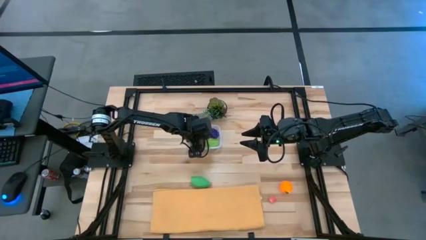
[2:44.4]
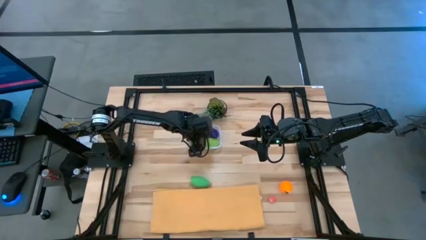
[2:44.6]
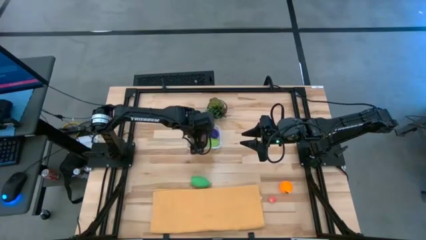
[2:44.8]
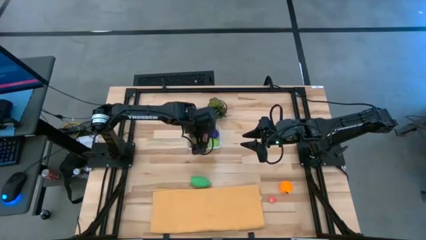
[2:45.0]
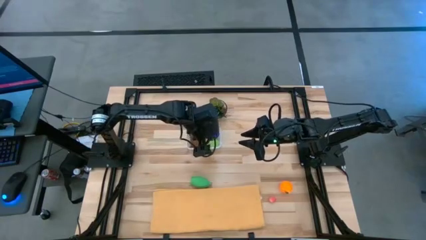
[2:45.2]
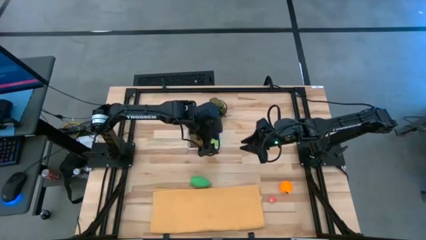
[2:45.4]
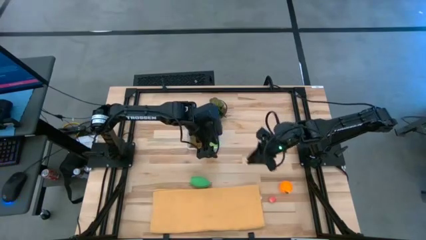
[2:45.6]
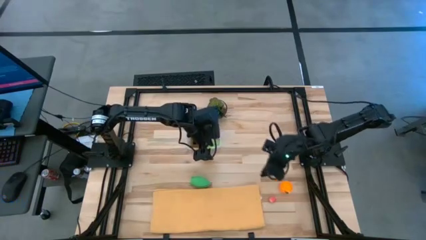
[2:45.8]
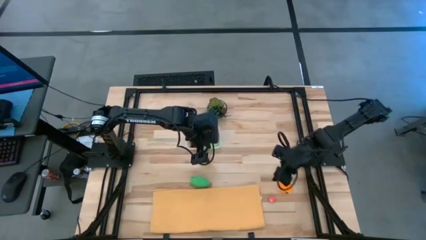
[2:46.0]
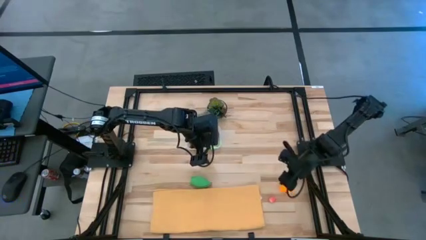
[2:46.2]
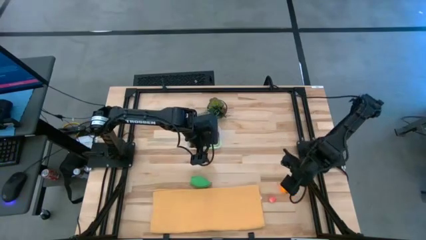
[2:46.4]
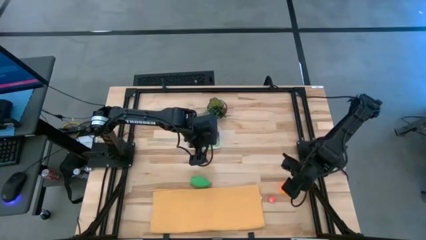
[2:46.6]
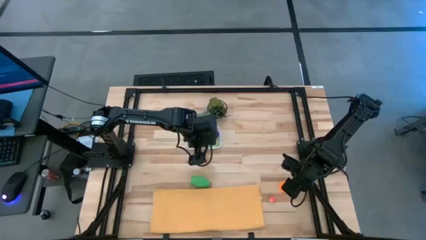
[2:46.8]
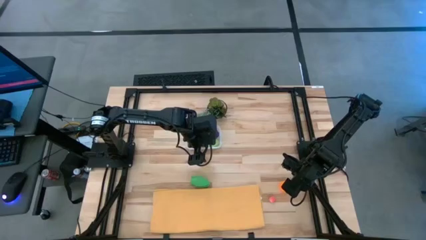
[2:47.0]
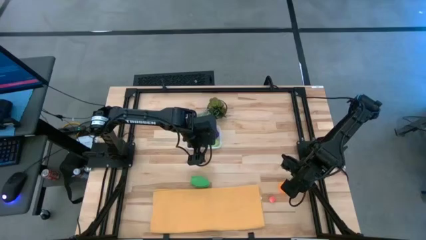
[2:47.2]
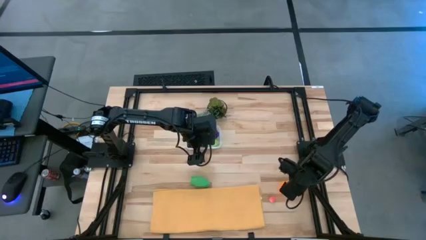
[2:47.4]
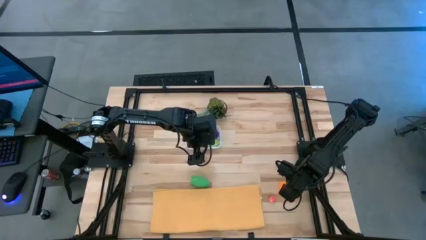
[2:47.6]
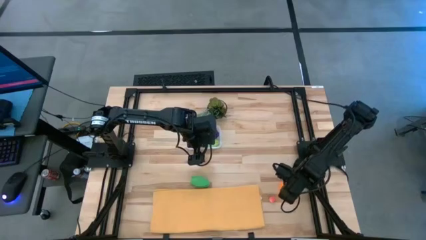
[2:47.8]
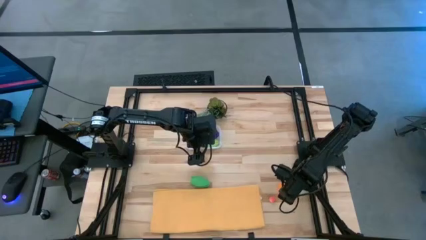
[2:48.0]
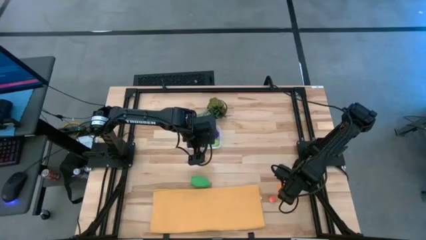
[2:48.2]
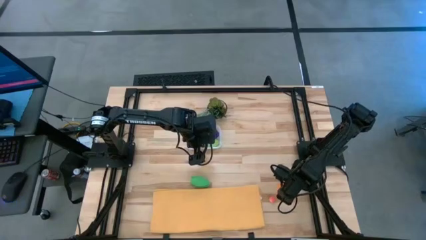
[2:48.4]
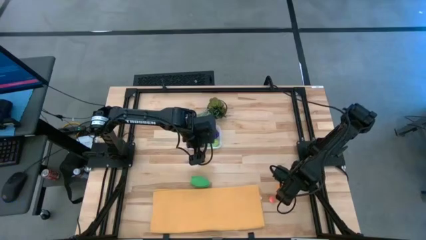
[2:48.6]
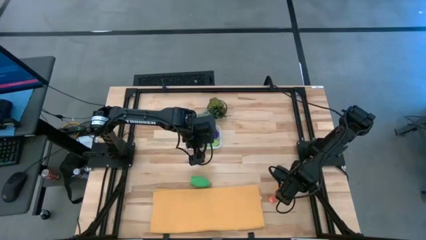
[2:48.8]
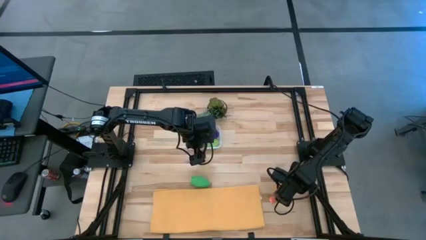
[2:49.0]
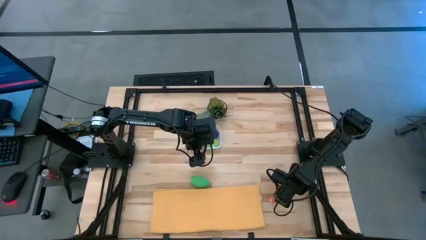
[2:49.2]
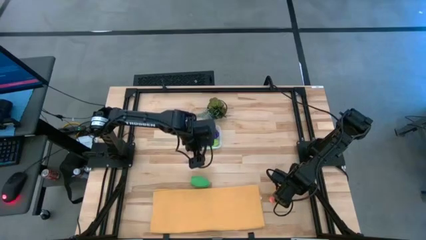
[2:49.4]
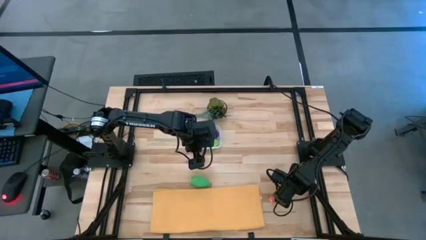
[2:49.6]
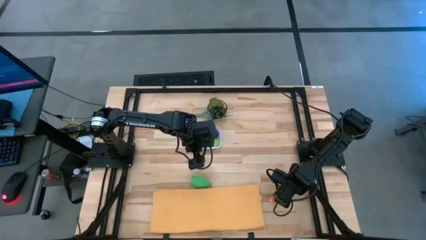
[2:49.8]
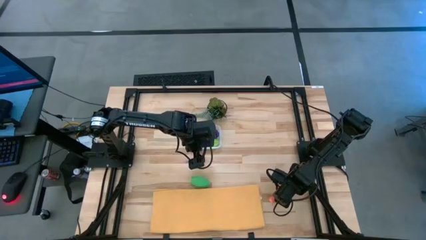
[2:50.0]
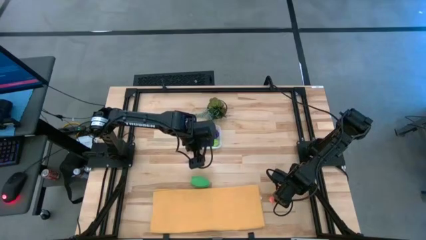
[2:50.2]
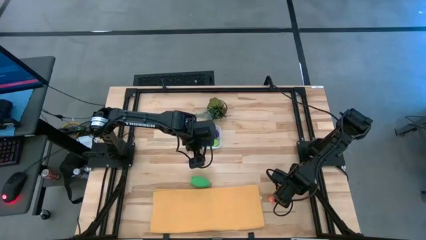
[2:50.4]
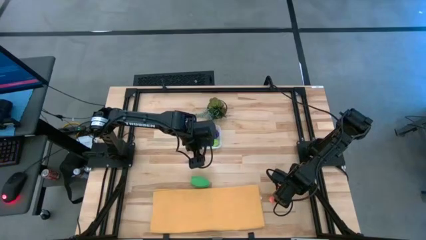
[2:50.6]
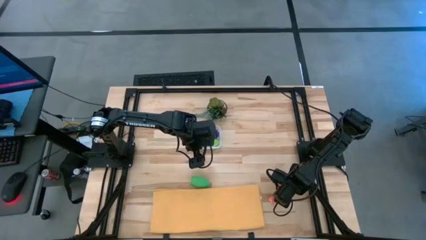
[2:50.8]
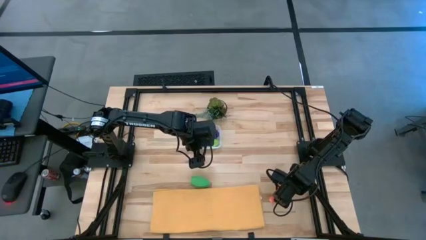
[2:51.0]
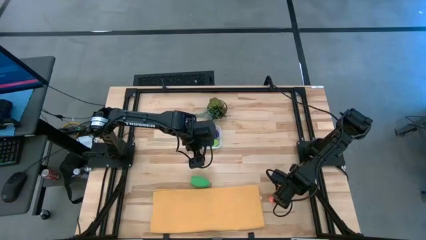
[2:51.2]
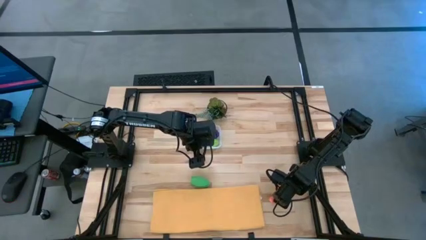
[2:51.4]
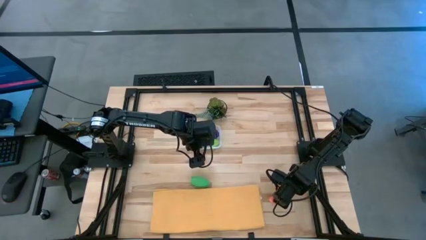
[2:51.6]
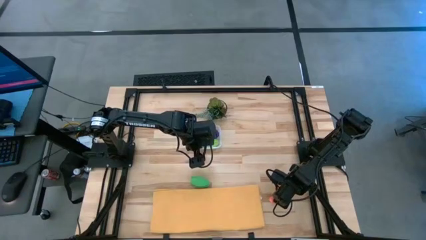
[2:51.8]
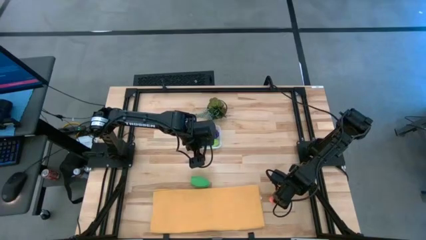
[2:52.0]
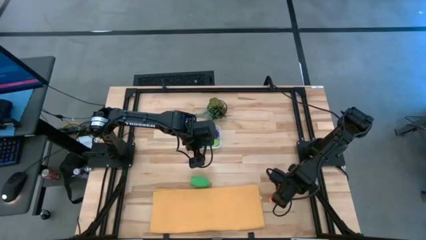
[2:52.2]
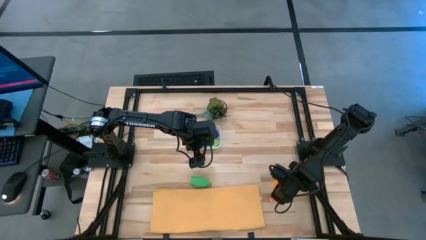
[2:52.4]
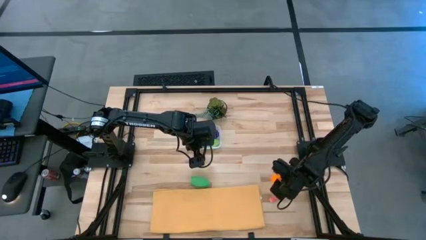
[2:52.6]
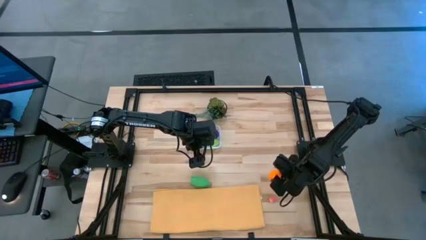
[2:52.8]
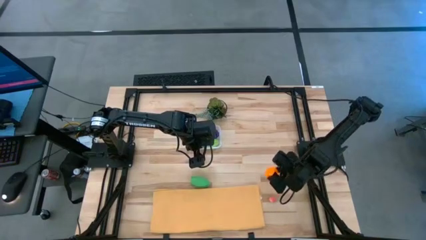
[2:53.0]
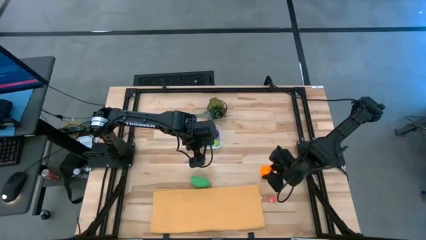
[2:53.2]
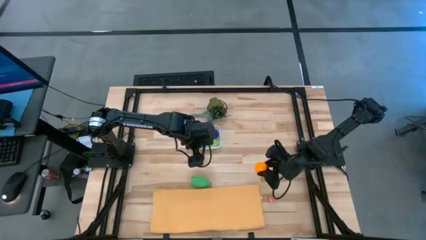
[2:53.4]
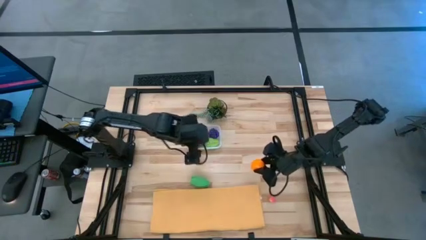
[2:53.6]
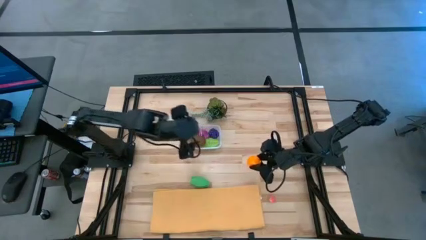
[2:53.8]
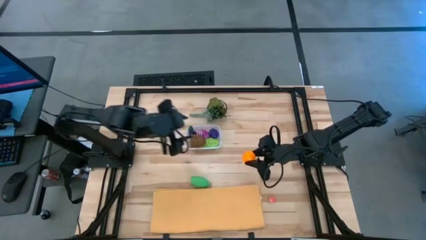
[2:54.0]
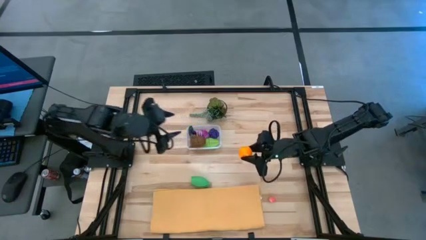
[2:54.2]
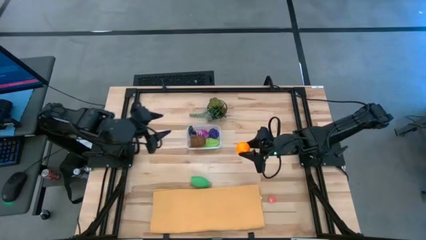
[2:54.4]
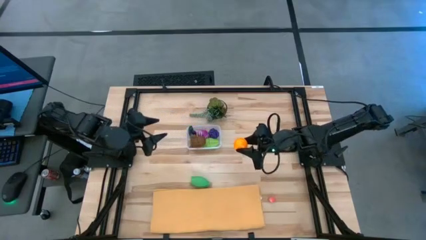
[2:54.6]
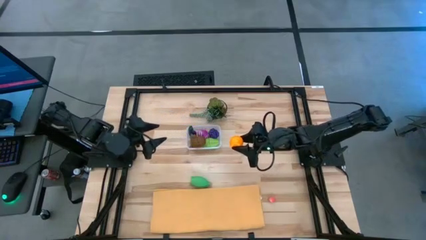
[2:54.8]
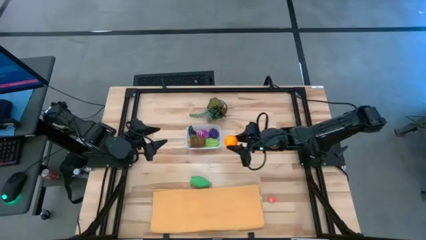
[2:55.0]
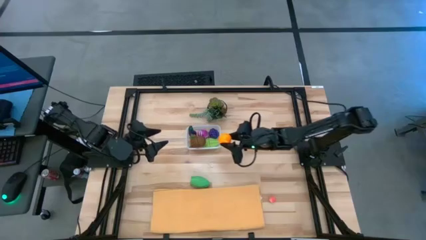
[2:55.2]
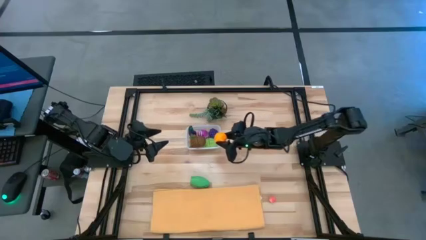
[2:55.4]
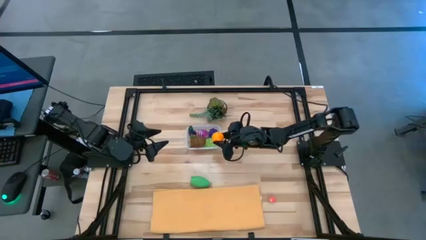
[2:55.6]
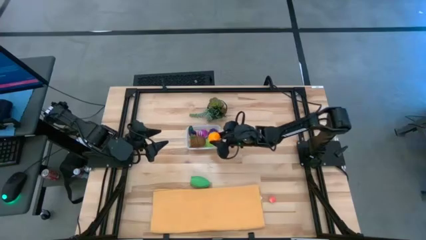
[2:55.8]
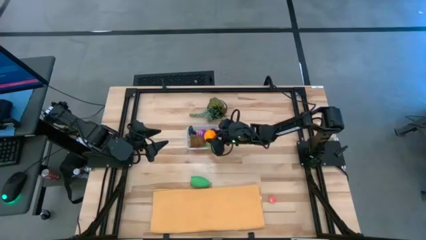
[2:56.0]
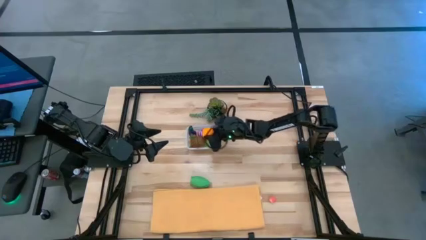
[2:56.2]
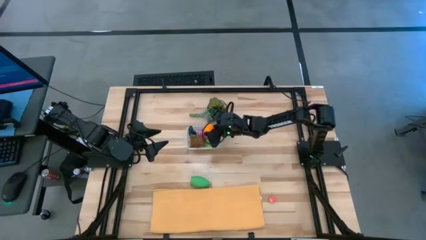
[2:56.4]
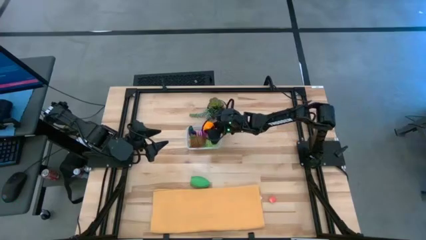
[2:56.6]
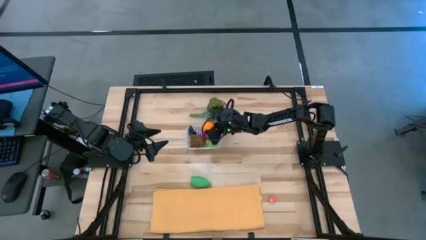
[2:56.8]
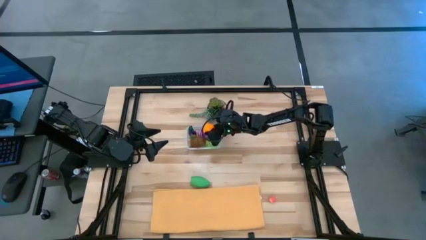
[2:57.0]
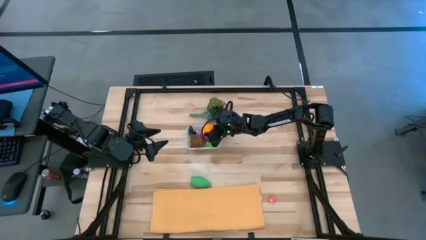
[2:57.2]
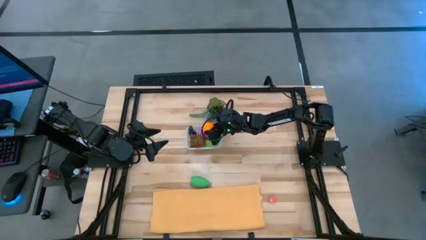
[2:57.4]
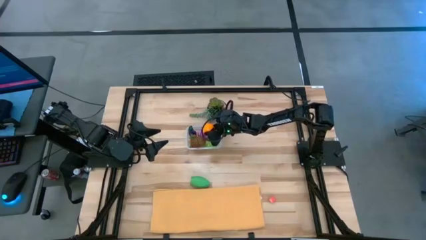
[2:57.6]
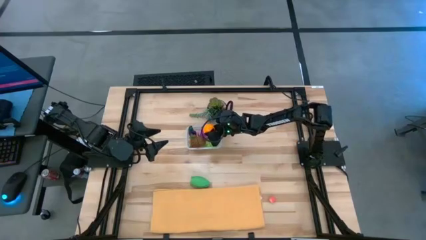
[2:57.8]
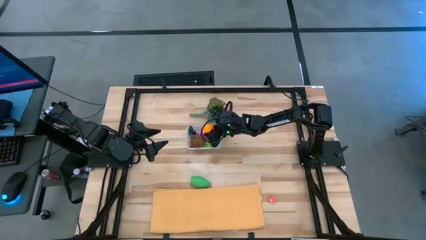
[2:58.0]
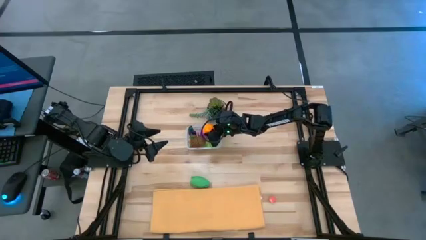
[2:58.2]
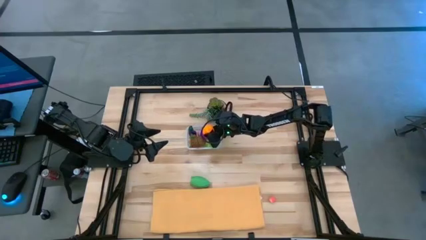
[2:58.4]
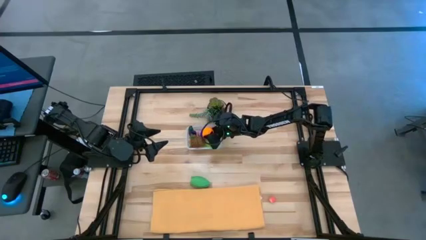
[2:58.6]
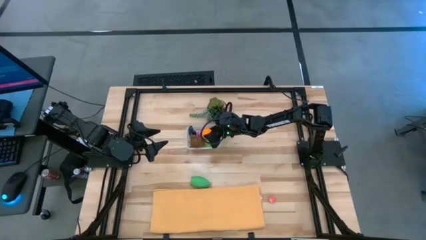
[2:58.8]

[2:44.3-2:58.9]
Task: Pick and placing Produce into tupperware
Put the orange into the transparent bin

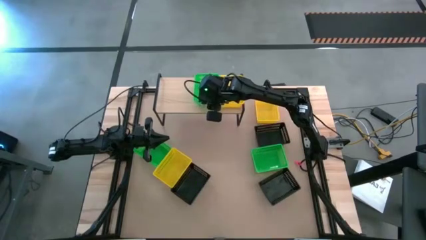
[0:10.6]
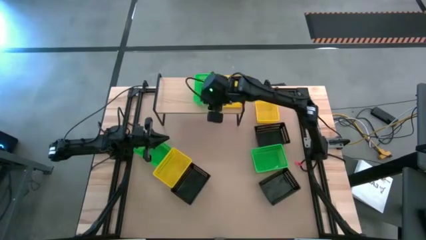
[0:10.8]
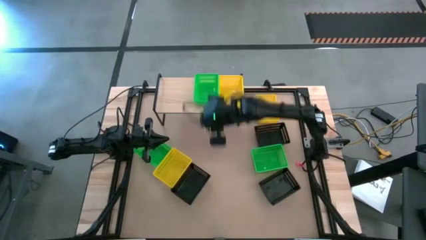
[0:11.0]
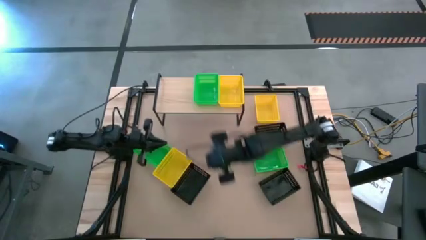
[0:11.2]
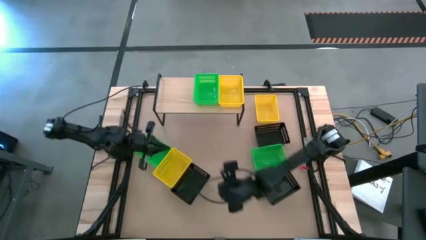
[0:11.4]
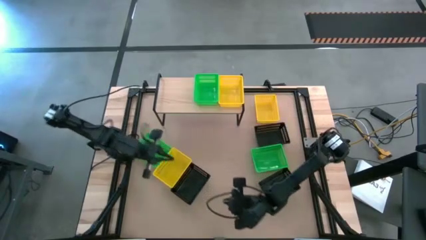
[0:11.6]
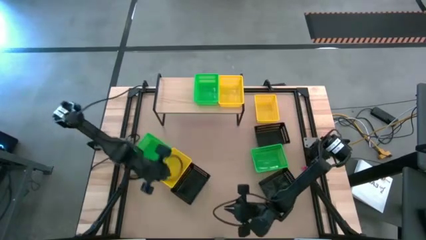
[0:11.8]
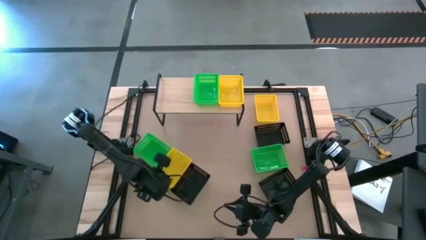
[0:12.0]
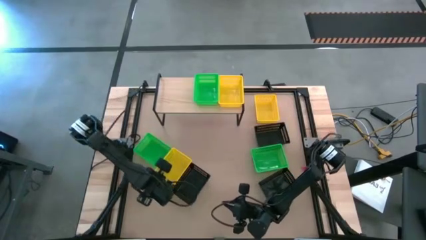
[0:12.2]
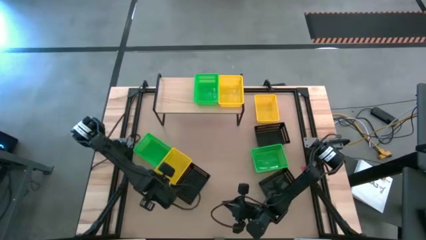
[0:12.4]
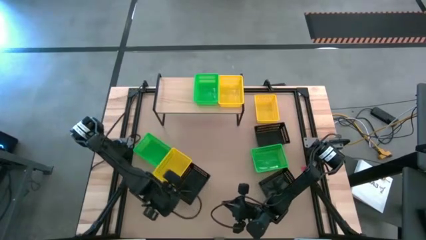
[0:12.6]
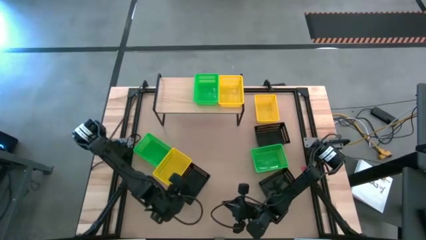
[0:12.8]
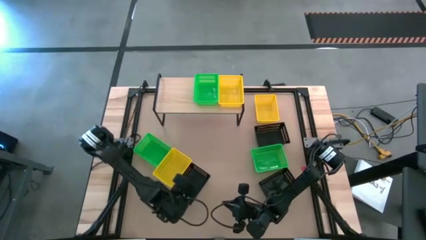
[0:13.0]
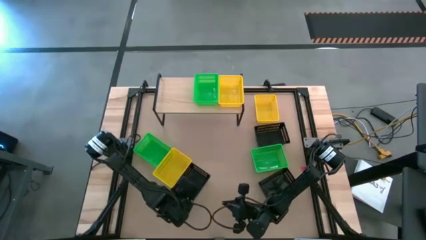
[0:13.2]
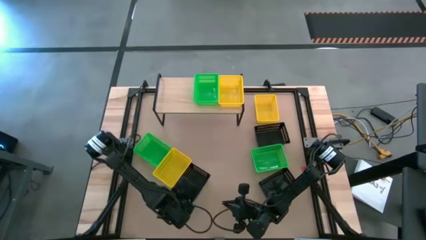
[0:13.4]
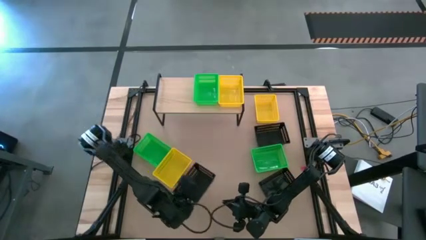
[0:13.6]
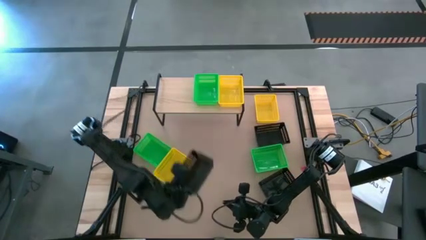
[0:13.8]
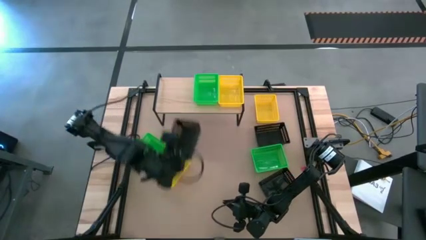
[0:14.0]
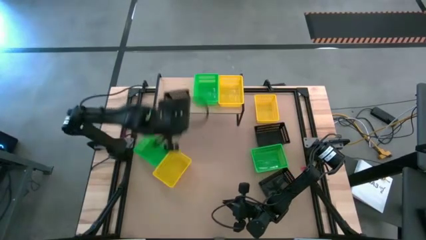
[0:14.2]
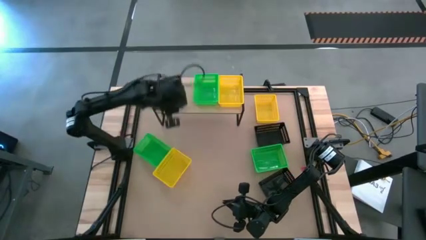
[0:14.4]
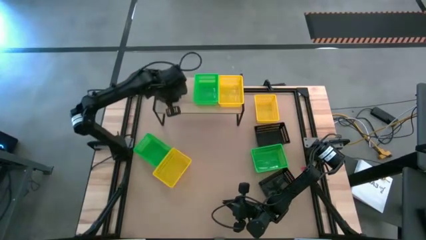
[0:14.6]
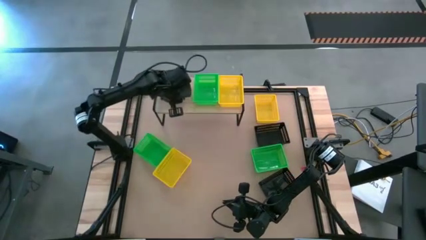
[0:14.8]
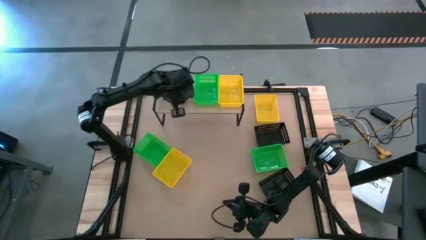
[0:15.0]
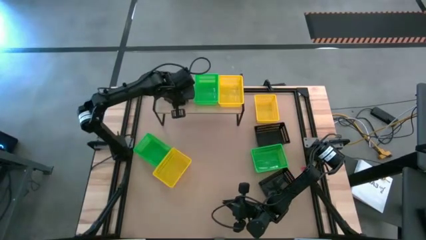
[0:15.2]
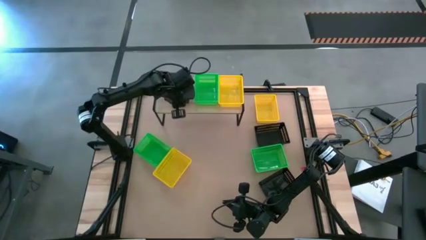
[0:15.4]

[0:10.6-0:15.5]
Task: Stack baskets on shelf by color
Put the bottom left black bin on the shelf
